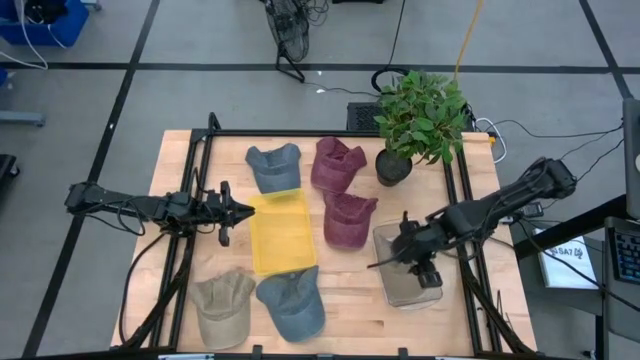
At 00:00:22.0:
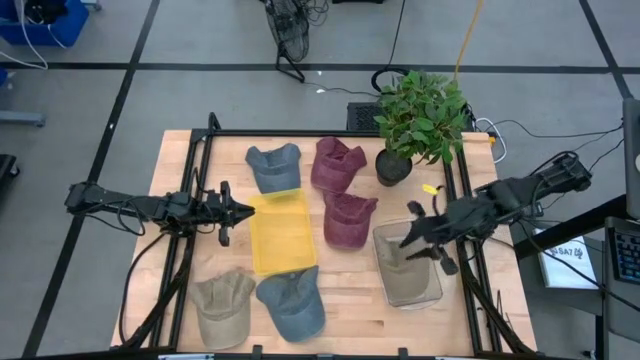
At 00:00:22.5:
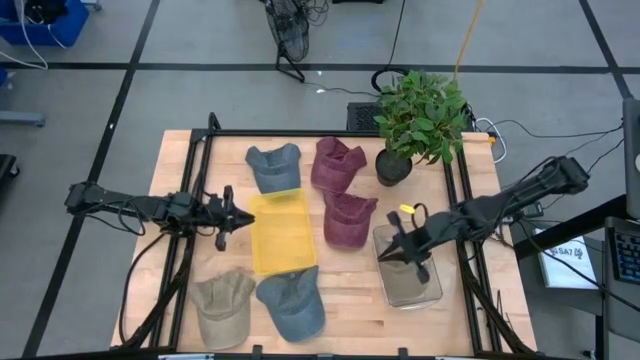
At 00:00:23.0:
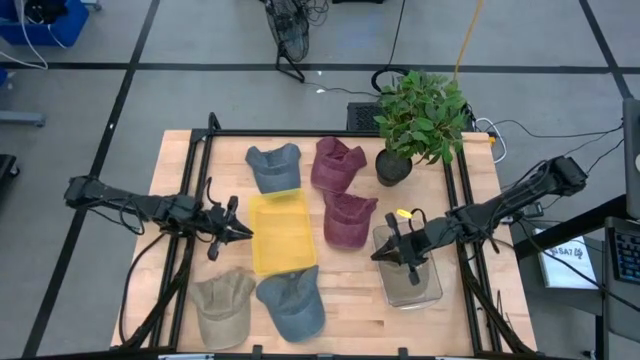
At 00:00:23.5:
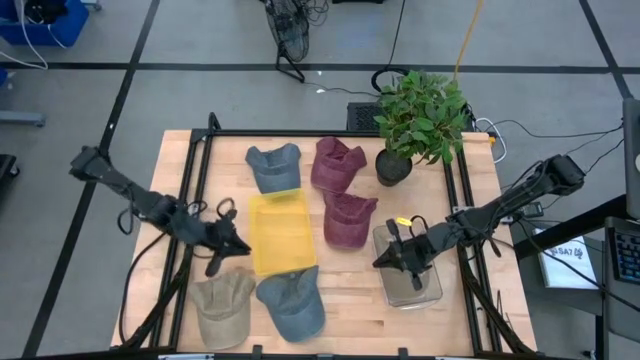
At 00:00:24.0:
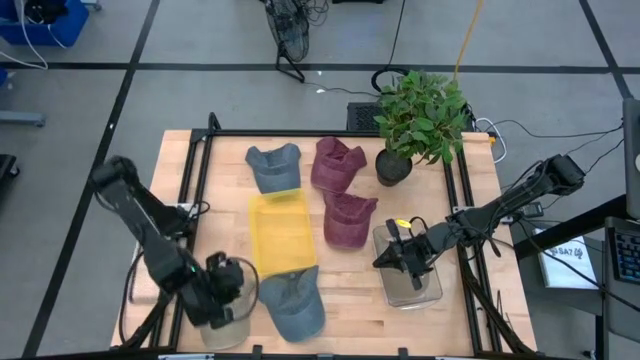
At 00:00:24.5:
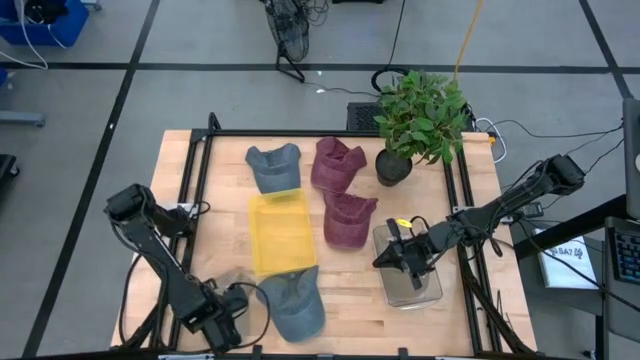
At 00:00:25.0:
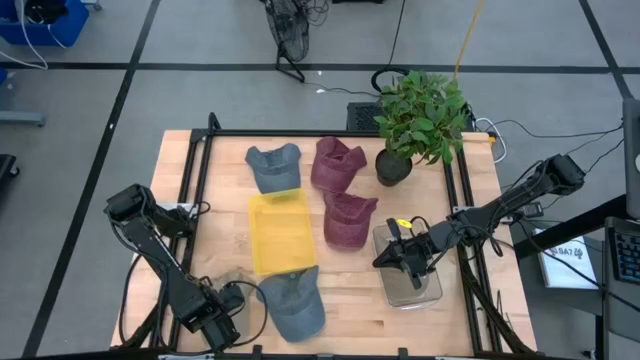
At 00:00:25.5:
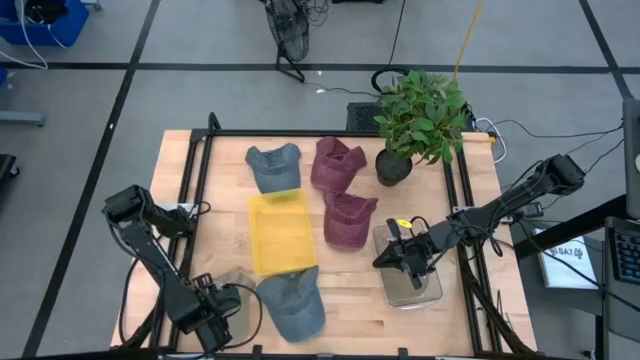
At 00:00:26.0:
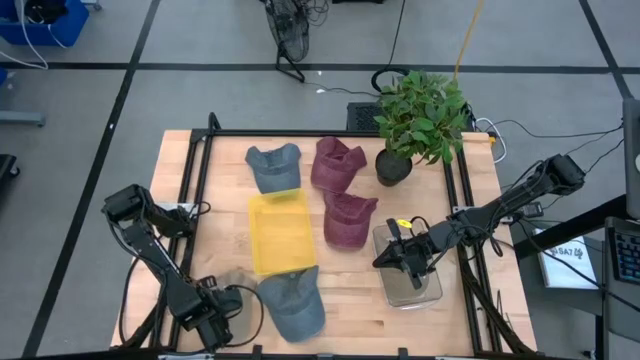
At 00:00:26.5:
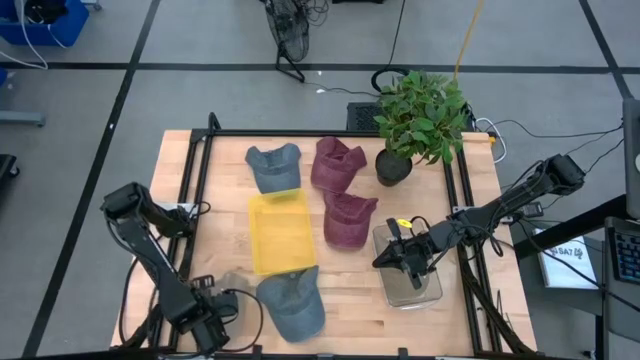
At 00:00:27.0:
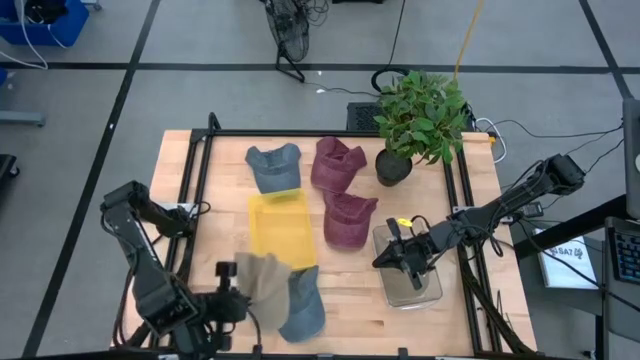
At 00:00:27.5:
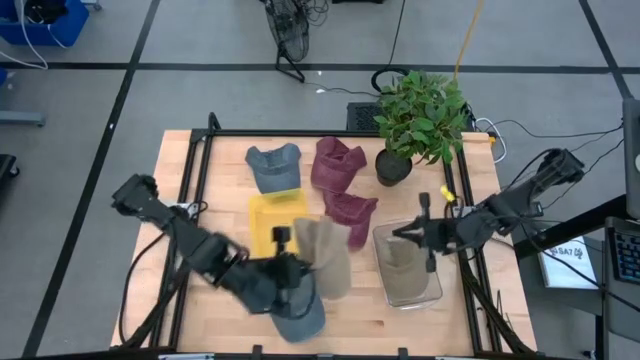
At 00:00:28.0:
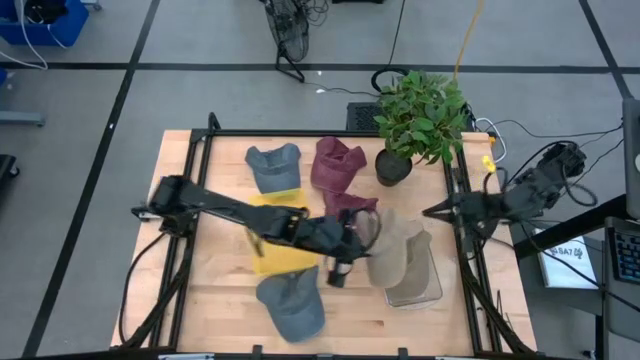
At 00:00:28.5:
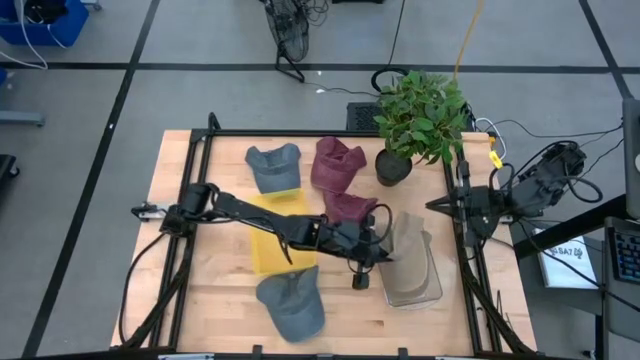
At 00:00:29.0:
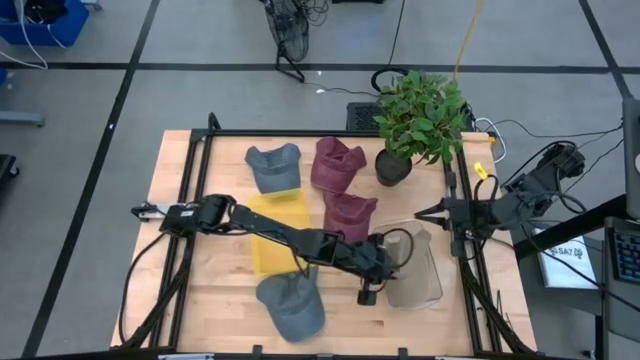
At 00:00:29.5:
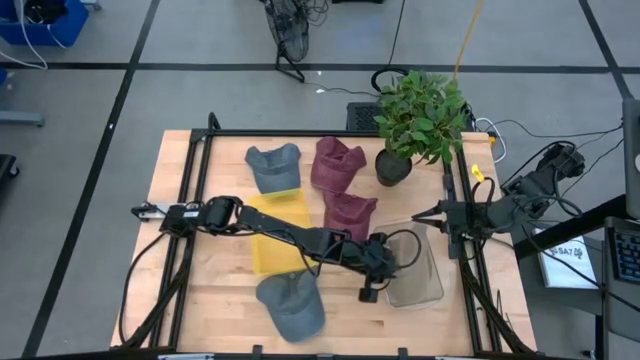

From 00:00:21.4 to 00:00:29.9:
Task: Pick & Place hat
Put the brown cap into the transparent bin

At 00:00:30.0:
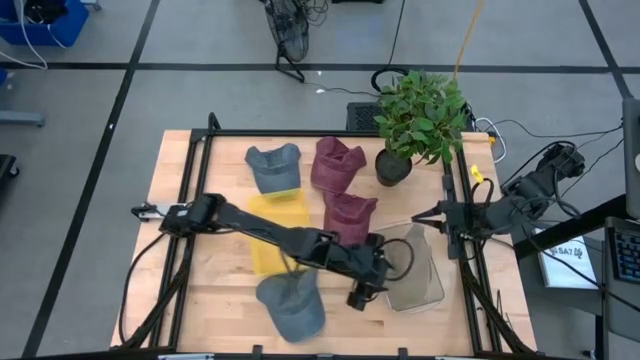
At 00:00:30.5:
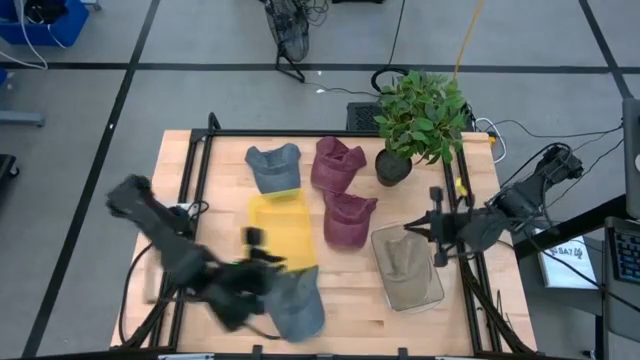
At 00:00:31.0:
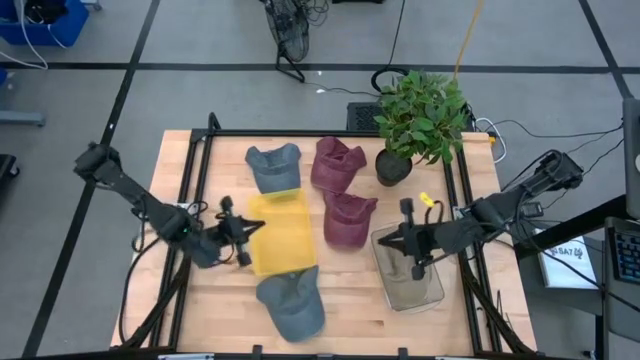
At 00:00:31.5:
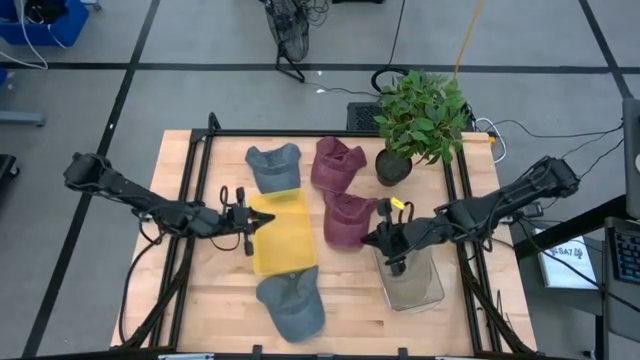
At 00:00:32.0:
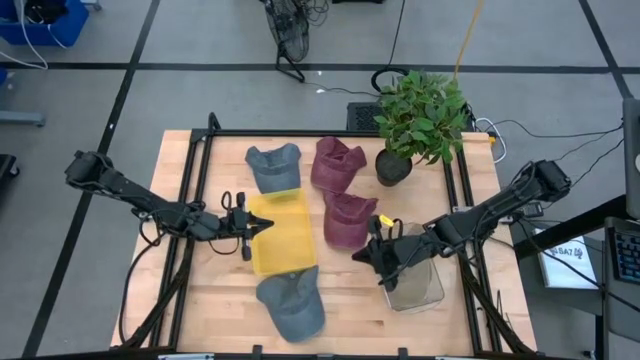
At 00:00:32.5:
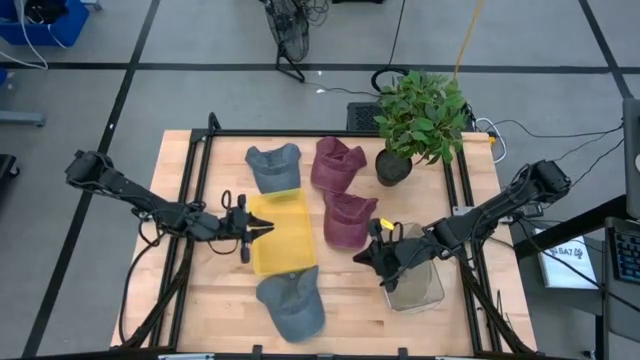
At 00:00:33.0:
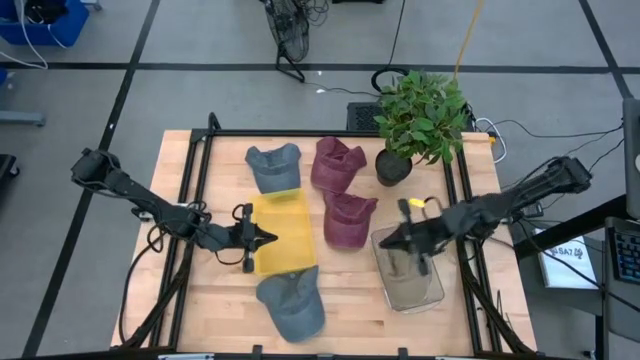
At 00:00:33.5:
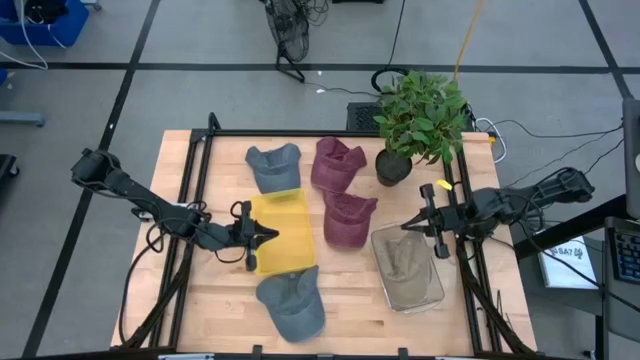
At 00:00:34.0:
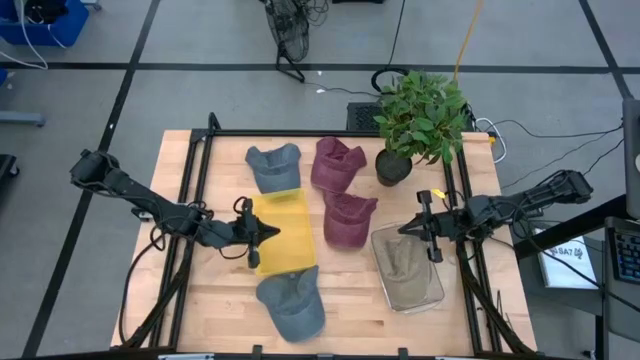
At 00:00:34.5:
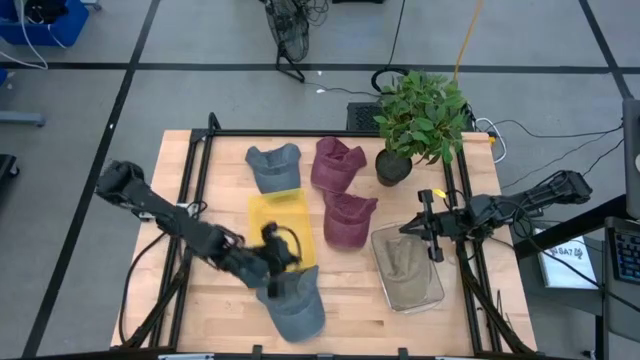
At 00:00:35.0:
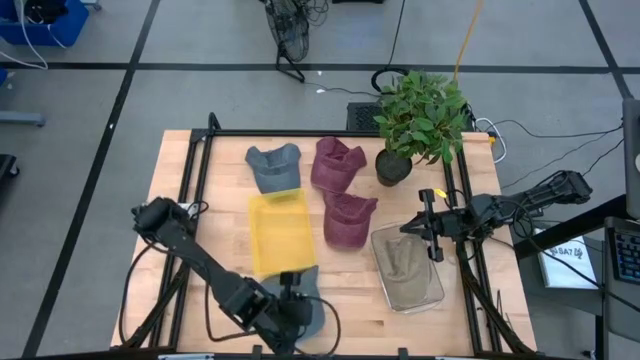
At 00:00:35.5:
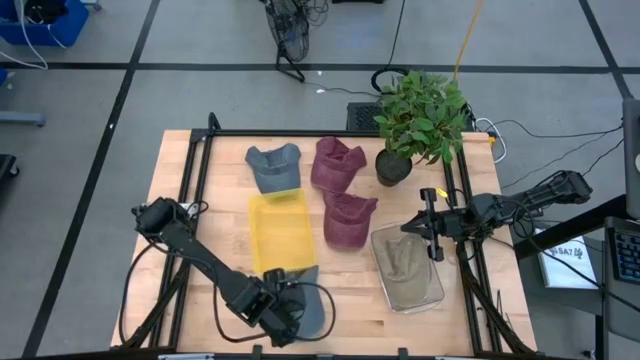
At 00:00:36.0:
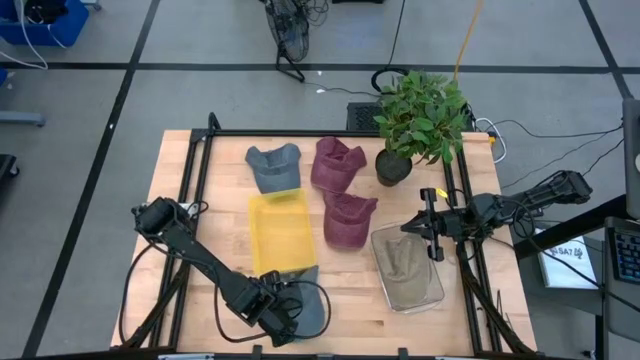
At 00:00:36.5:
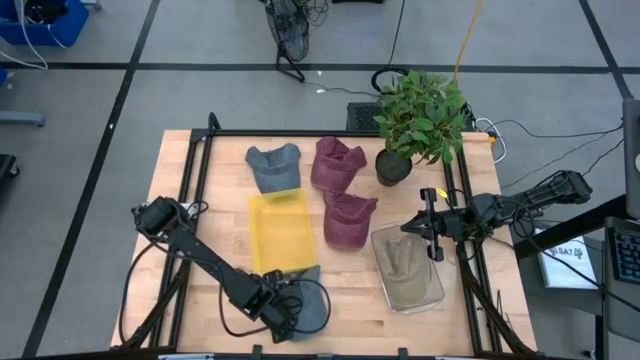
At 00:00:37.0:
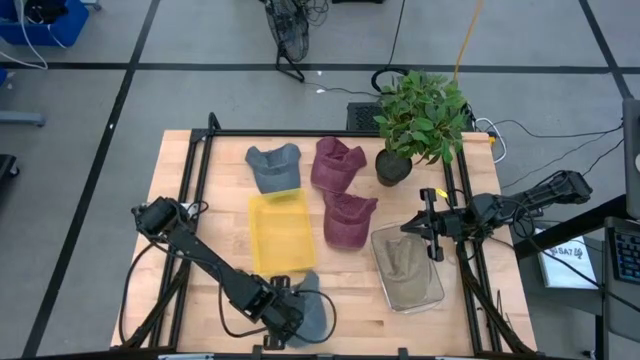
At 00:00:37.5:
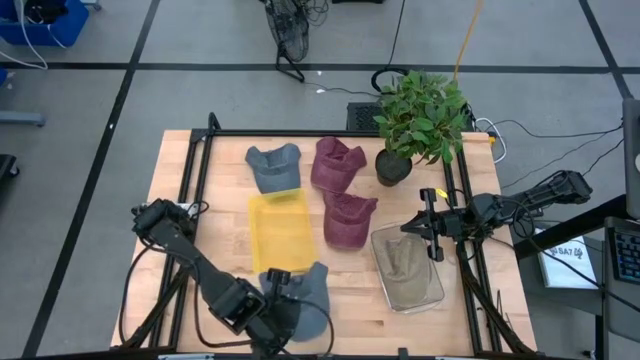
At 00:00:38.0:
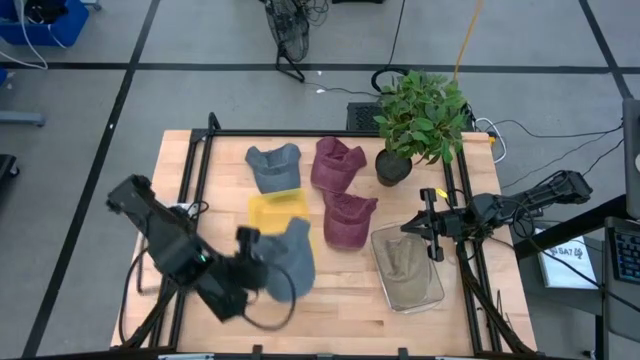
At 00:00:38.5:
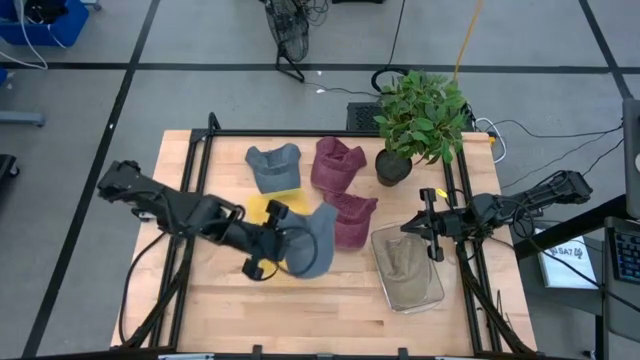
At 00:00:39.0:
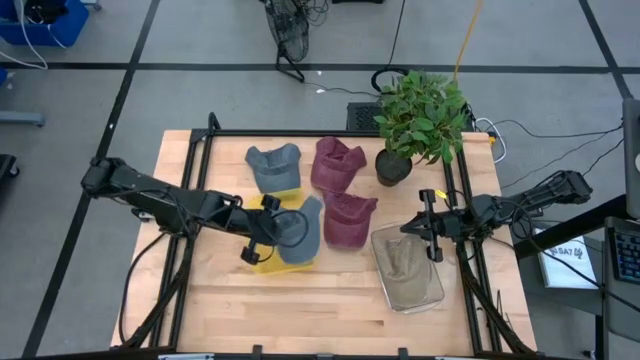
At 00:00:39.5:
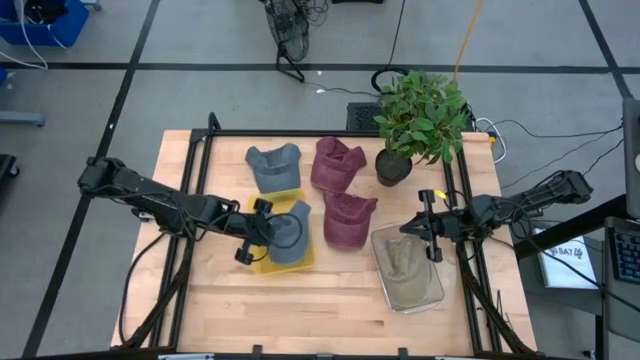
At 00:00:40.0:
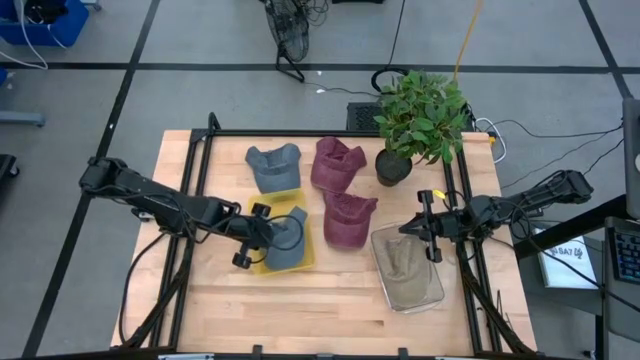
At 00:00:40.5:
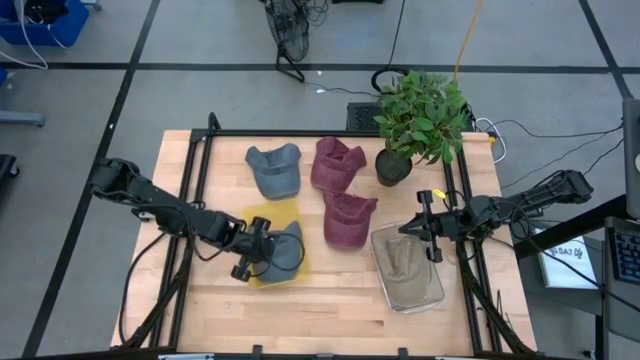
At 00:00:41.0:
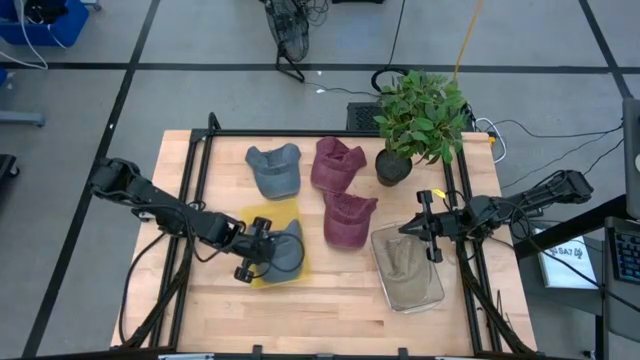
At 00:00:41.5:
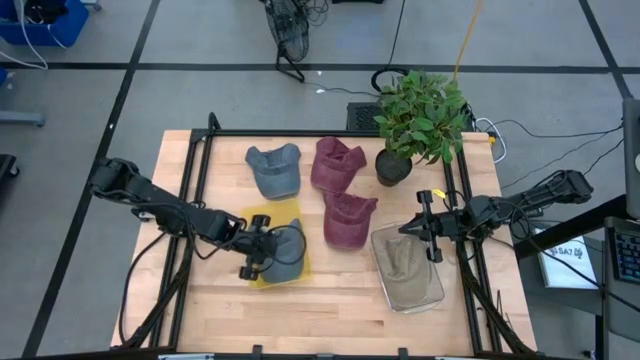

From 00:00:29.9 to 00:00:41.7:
Put the bottom blue cap into the yellow bin

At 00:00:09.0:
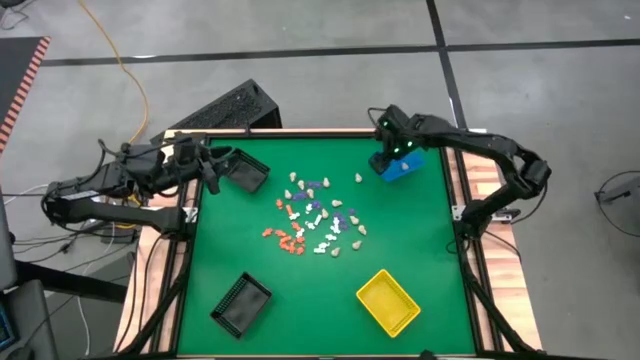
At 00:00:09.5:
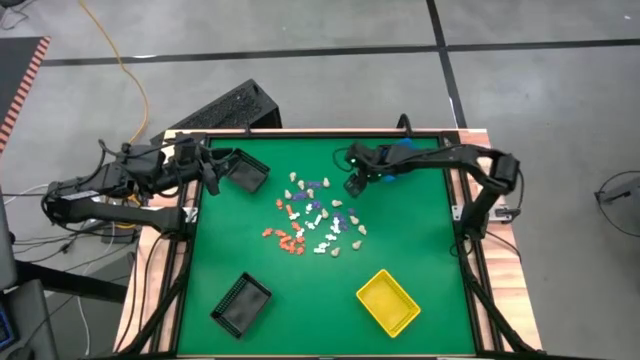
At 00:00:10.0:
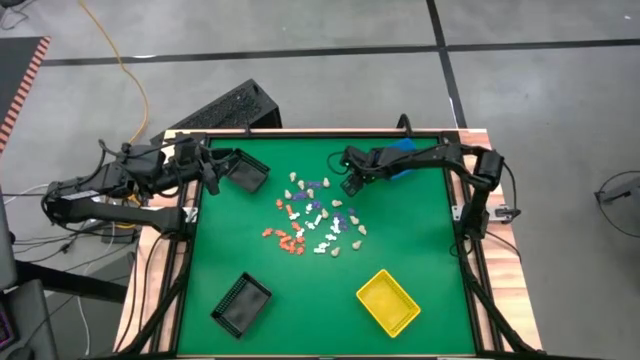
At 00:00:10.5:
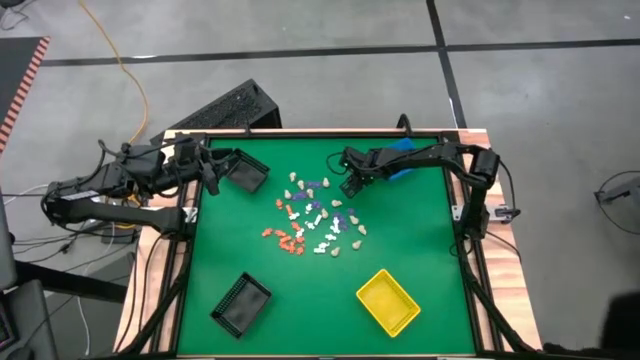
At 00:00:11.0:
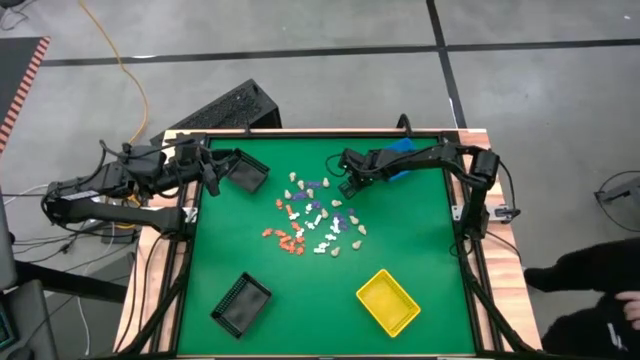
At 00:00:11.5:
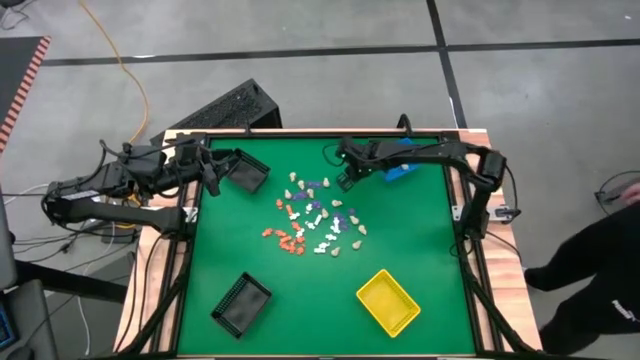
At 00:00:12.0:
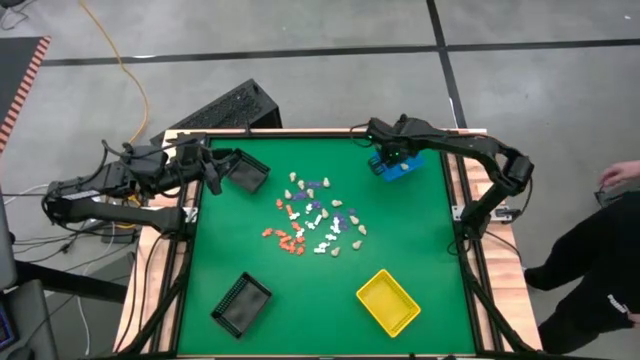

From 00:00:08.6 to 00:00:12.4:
Task: Sort Halloween decoration
Put the skull toy into the blue basket
